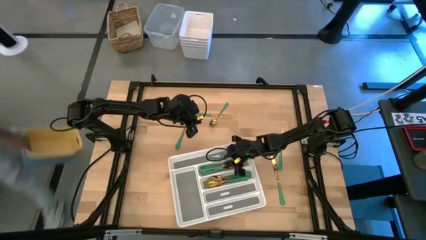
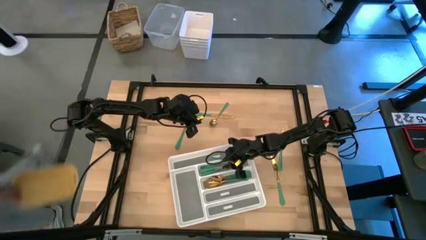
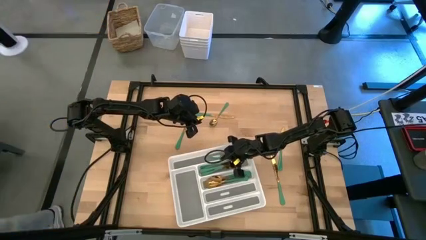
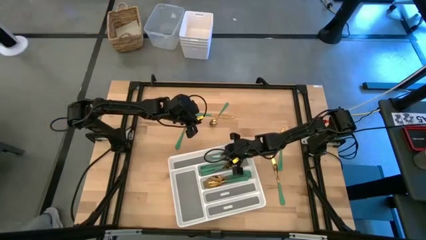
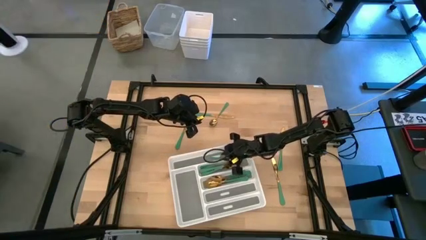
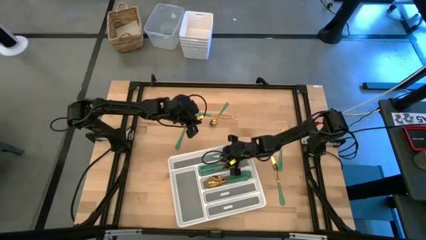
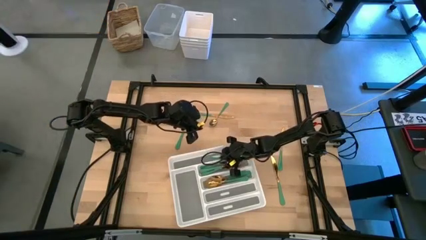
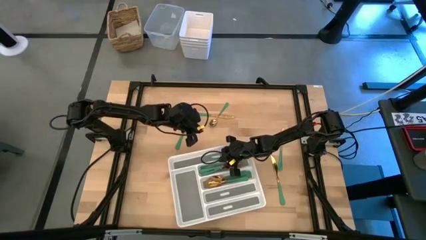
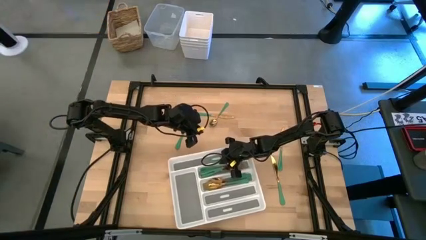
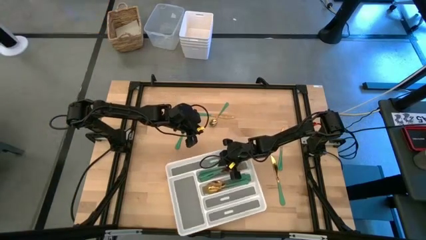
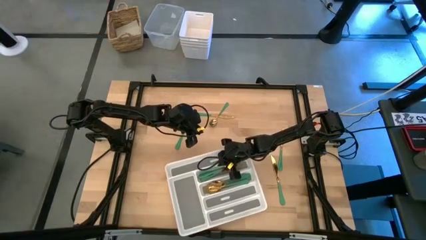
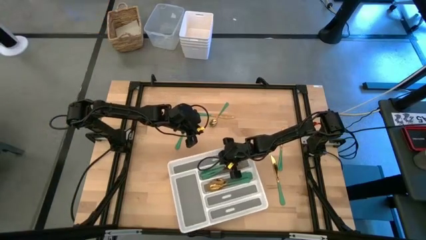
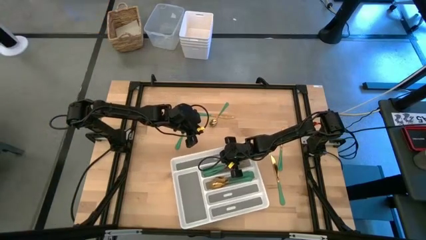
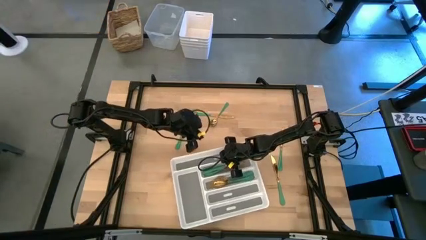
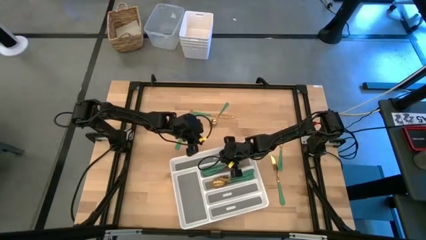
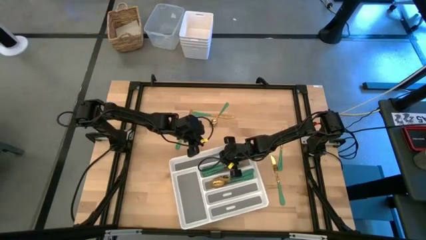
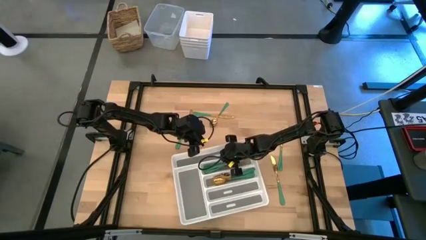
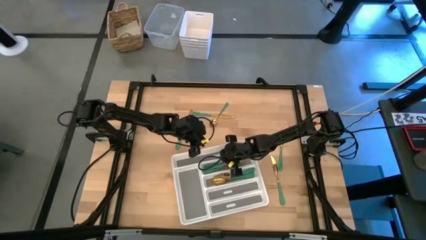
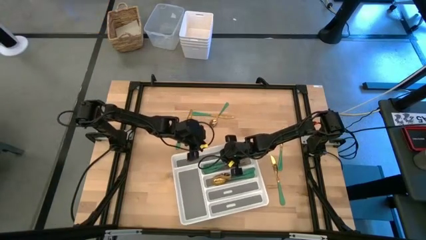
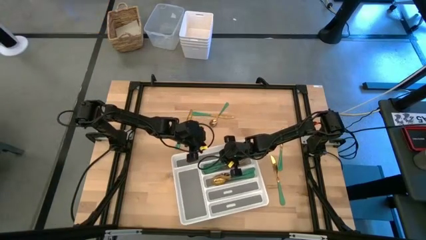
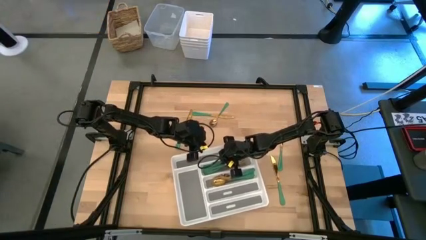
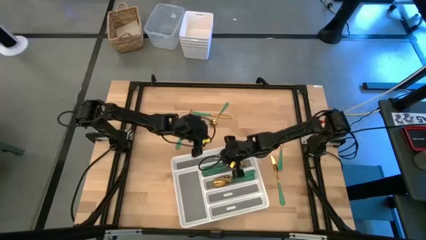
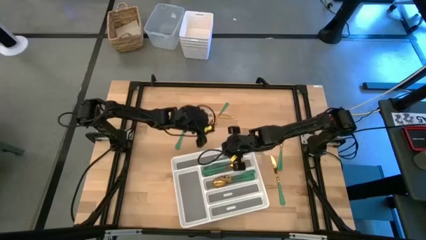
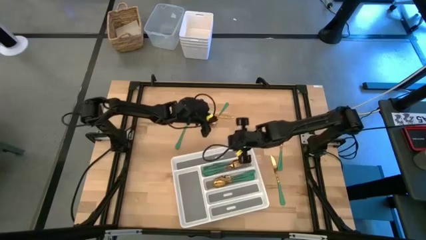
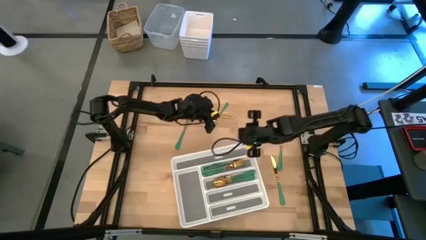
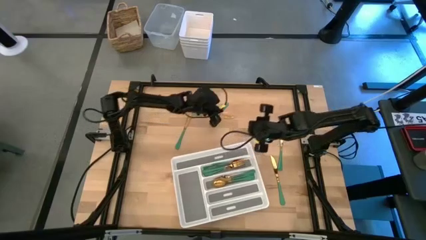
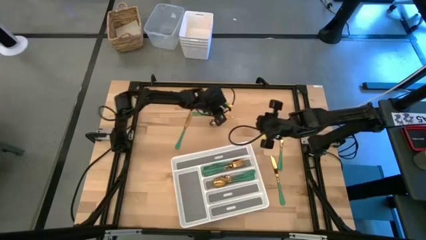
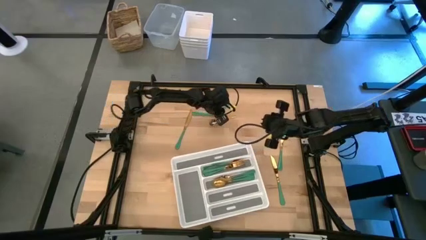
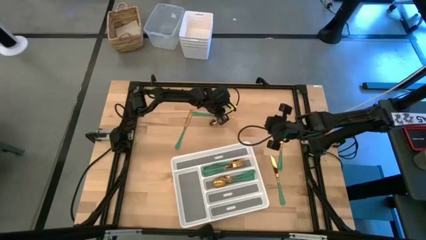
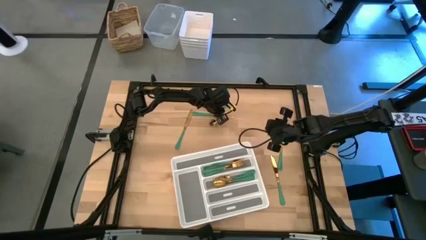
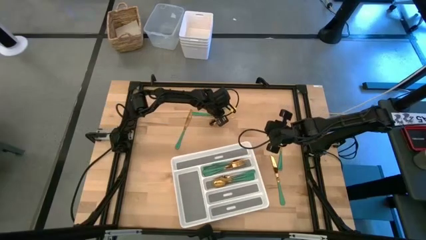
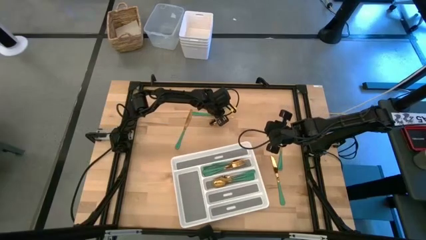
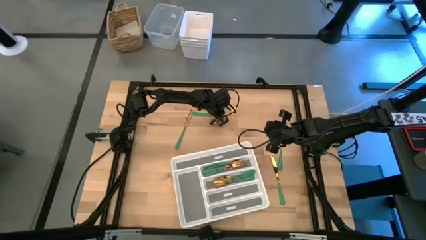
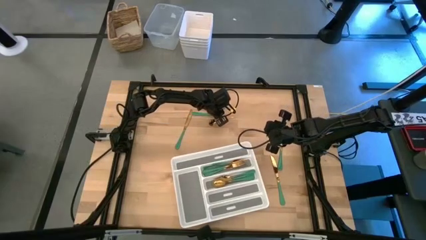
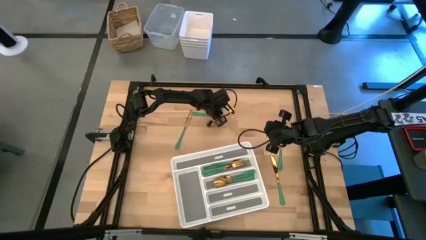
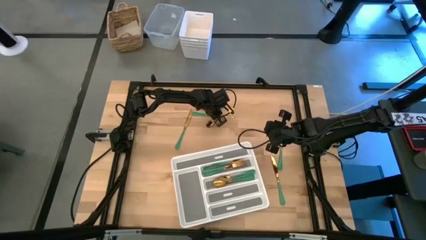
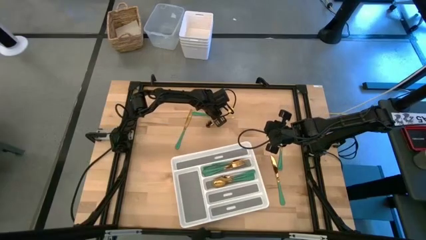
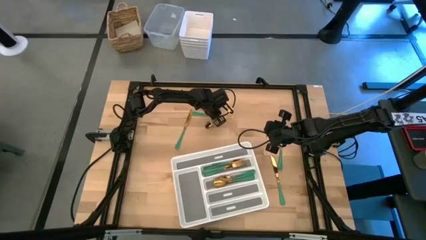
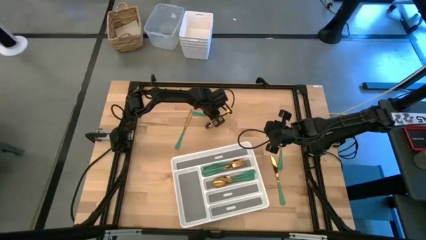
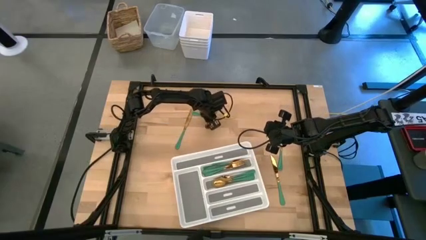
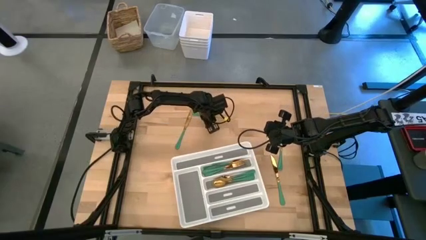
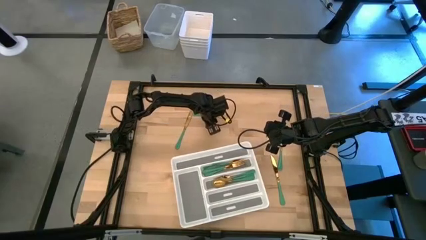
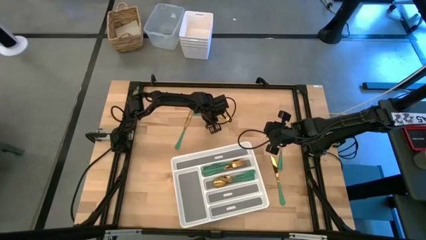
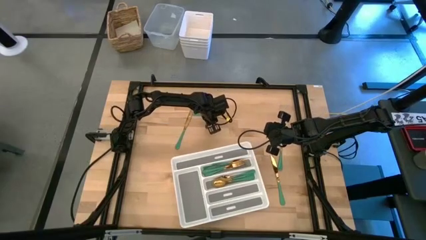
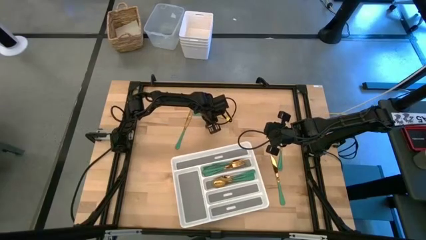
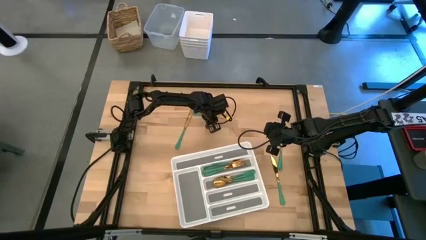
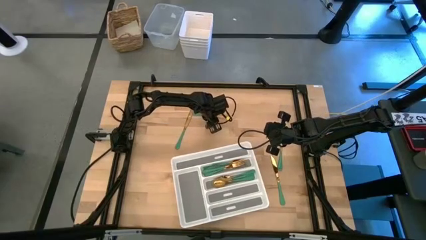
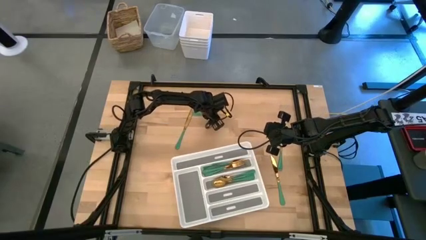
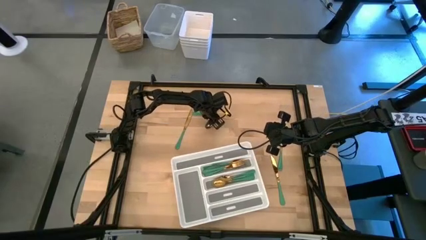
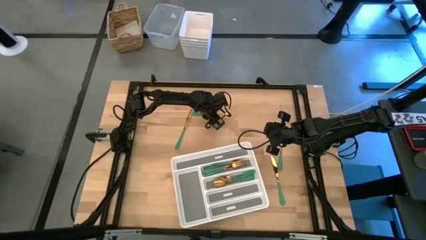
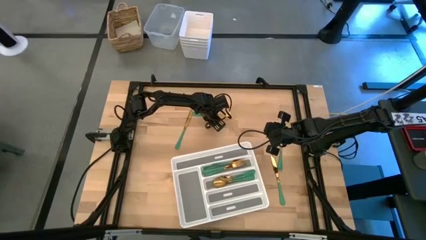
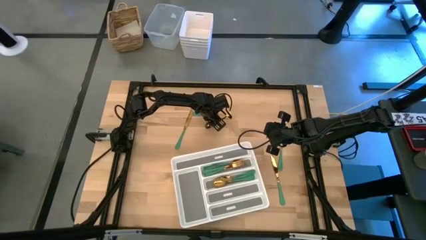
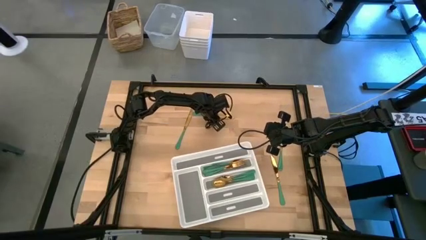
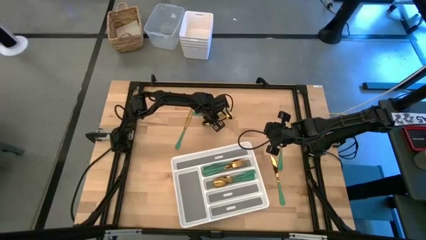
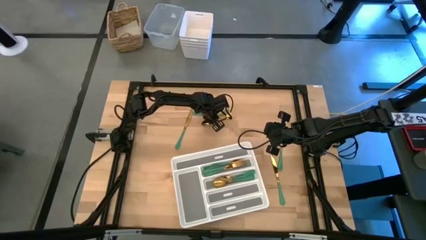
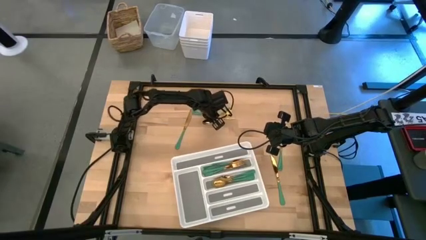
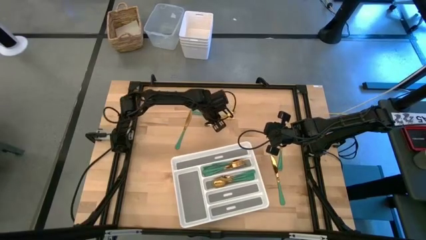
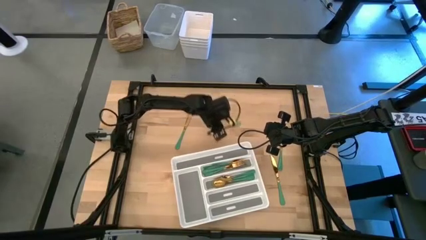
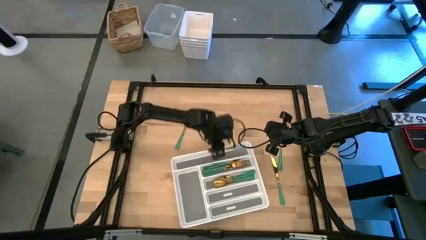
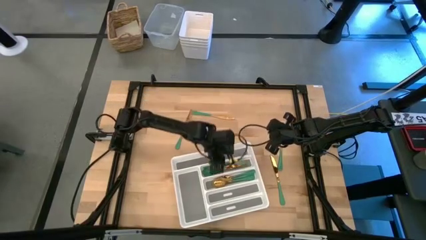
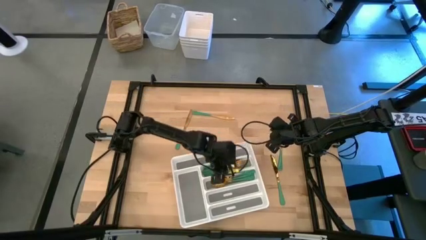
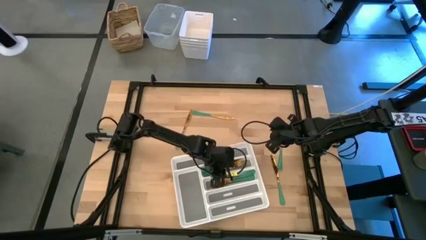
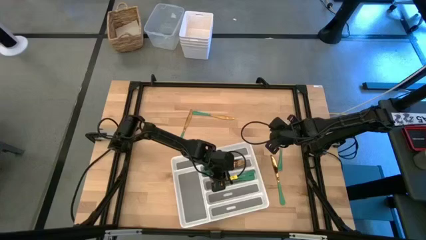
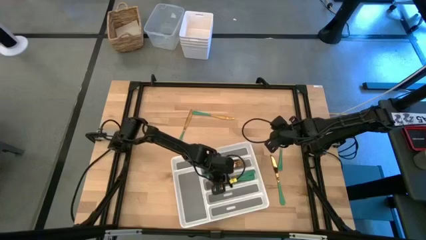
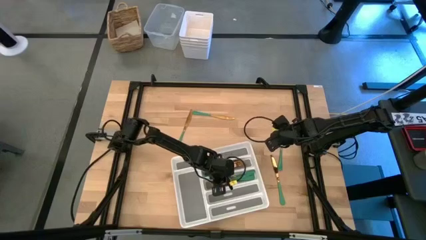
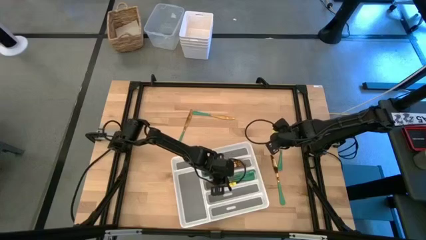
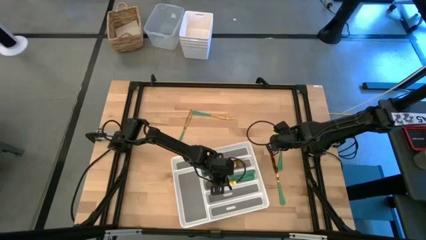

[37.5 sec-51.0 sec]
Task: Sort silverware
Put the green spoon into the white silverware tray
